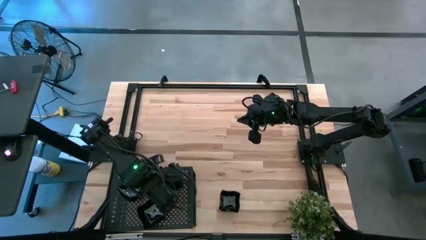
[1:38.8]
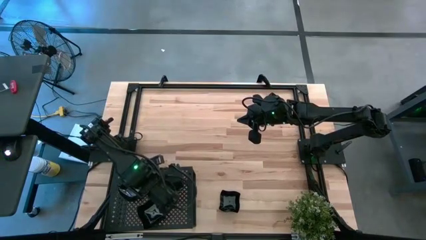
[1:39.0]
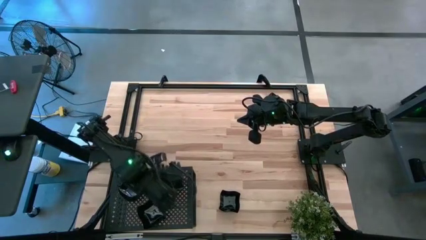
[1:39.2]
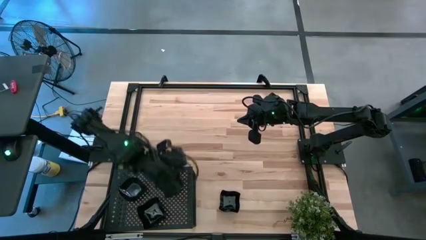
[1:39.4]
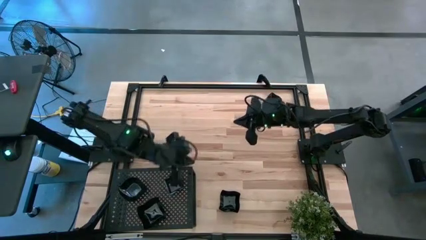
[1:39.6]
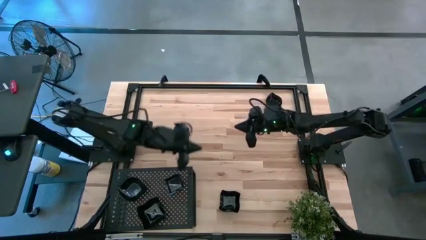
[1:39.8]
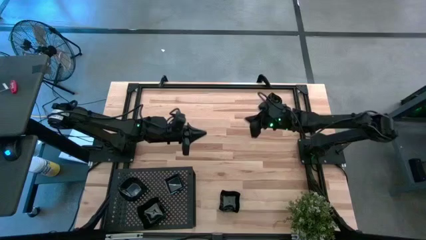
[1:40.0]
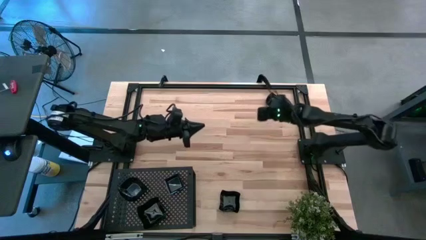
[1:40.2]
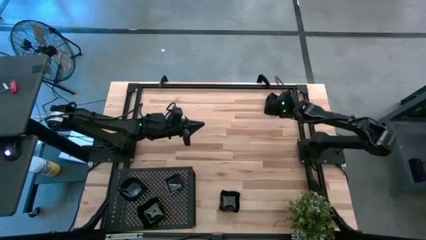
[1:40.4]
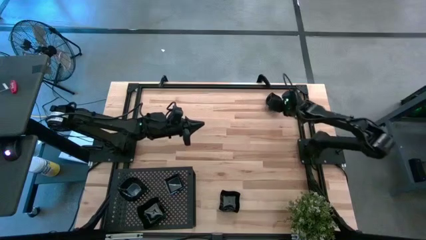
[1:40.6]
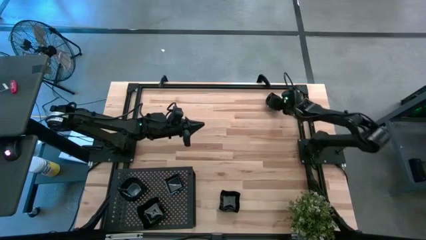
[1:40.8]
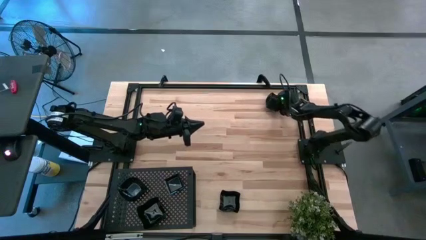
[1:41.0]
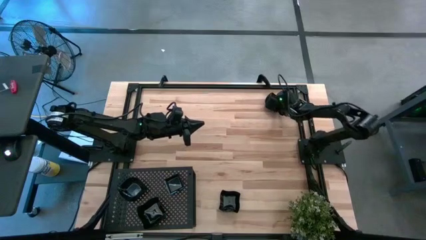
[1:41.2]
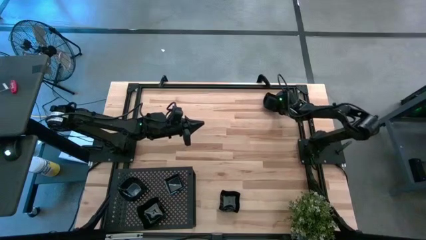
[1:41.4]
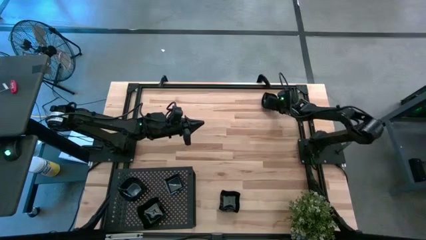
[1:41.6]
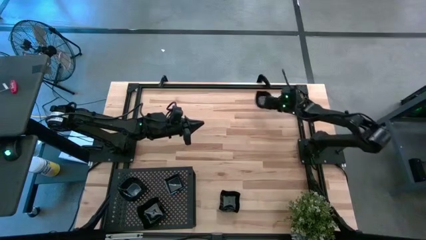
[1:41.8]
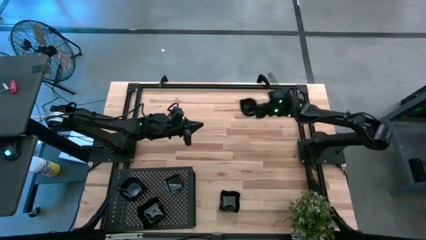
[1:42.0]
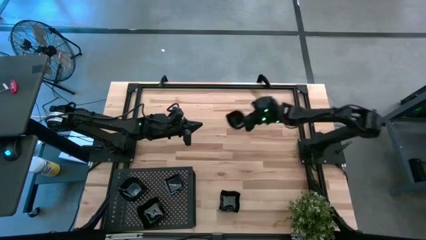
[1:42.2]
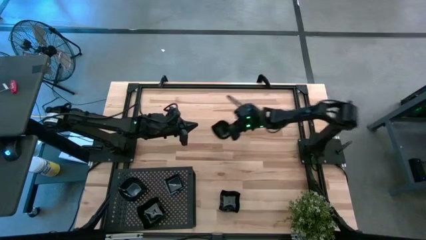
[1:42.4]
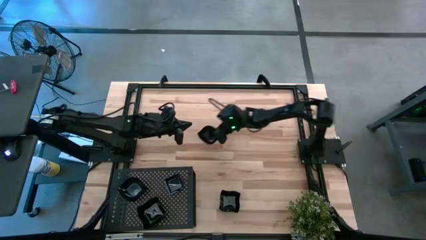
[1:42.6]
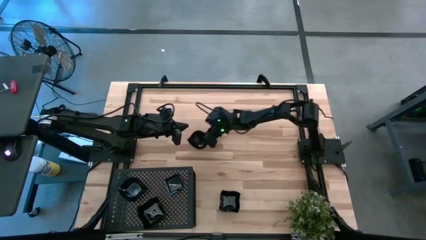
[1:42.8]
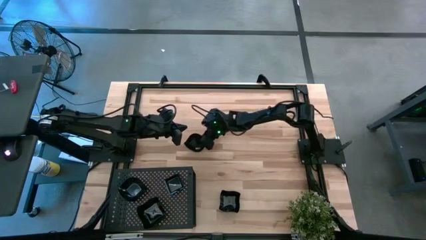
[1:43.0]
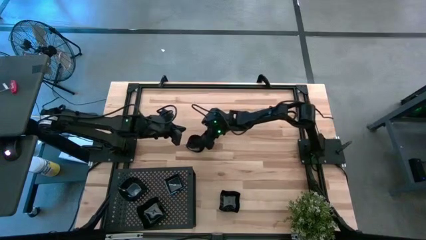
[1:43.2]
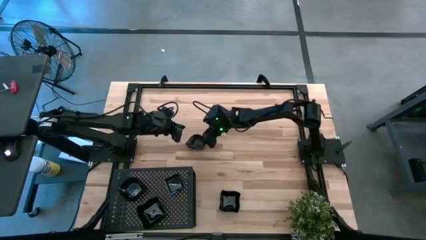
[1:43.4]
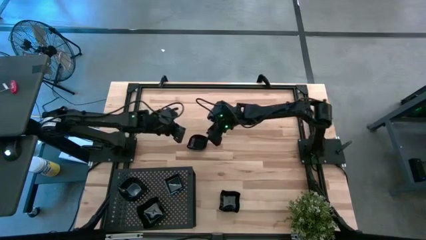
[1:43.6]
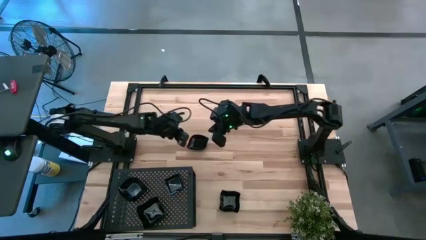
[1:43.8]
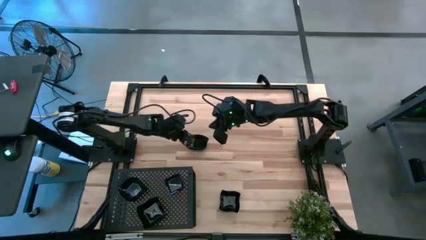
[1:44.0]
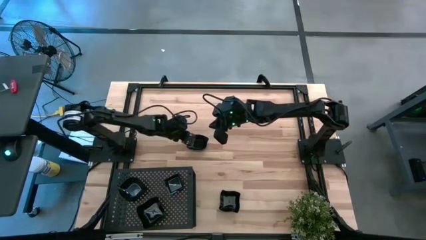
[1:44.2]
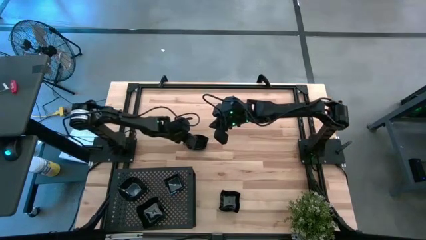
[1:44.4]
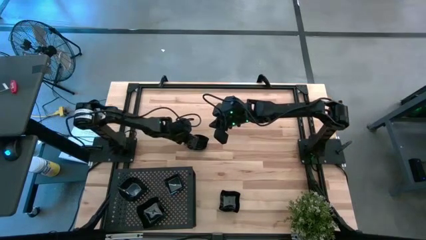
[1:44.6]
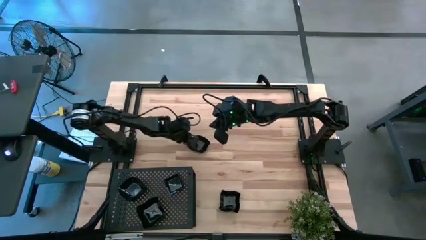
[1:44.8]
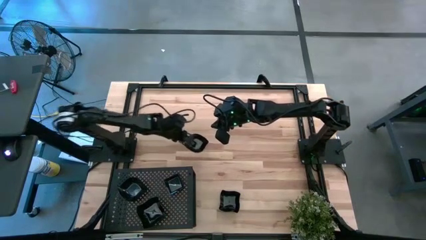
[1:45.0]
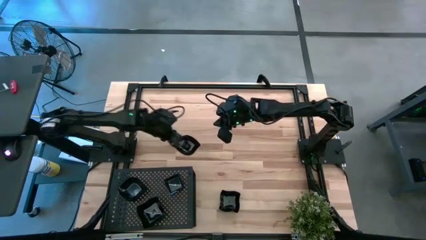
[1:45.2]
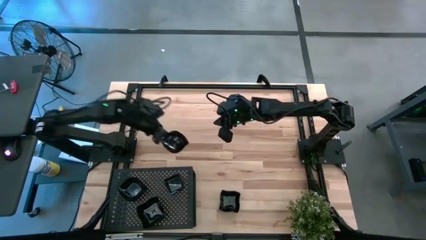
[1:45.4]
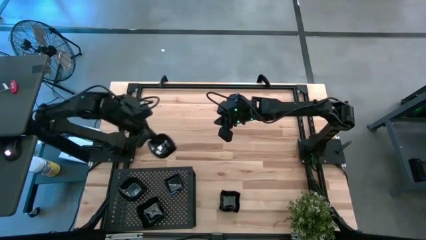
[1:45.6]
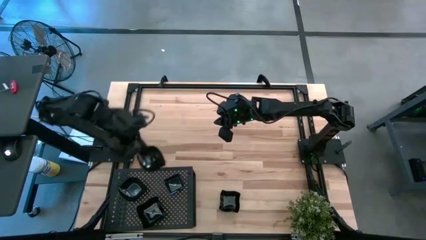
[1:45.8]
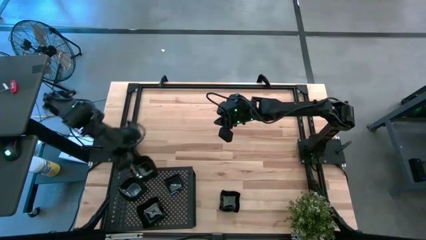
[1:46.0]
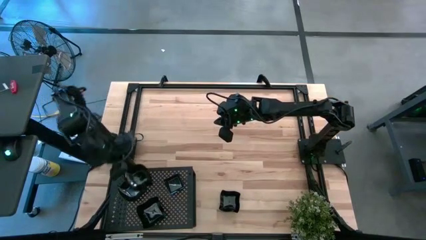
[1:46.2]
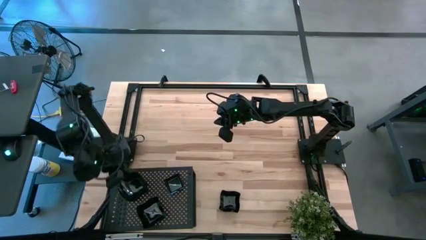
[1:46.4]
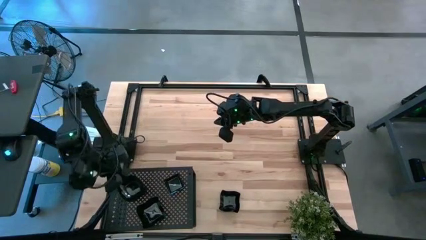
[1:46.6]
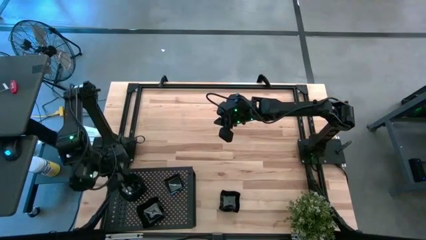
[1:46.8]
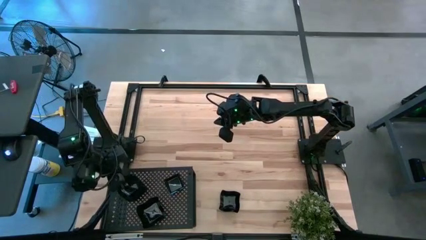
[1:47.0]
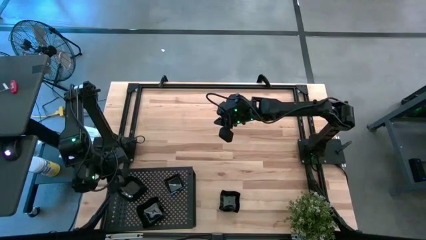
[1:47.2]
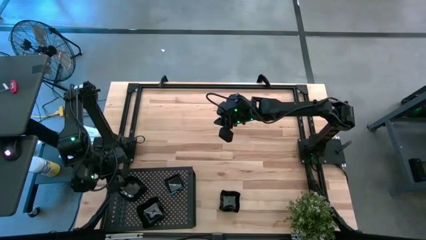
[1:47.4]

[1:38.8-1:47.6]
Task: Pick & Place Mini shaped plates
Stack the leaf-shaped plate on top of the leaf-shaped plate on the shelf

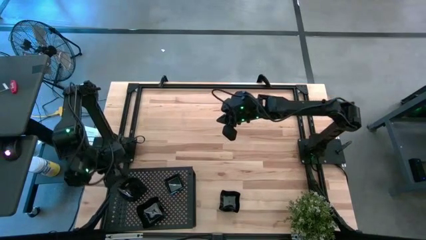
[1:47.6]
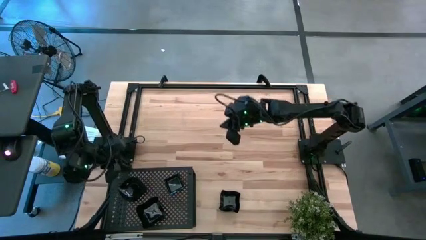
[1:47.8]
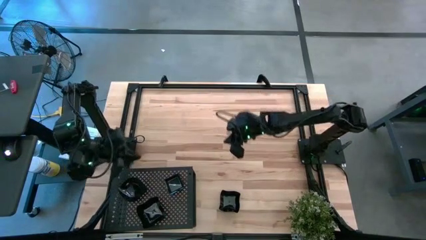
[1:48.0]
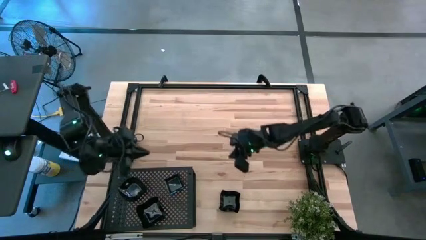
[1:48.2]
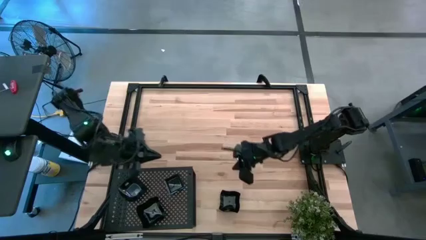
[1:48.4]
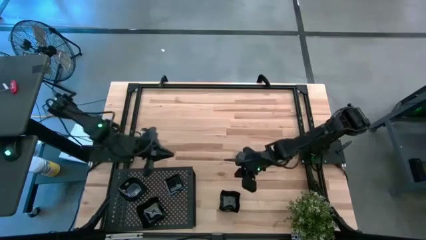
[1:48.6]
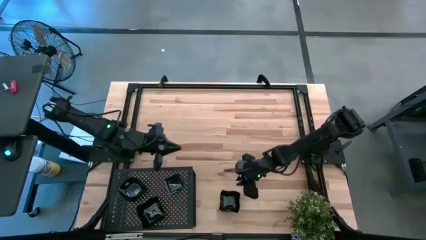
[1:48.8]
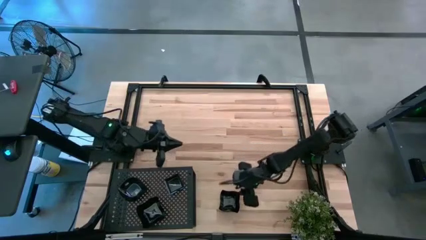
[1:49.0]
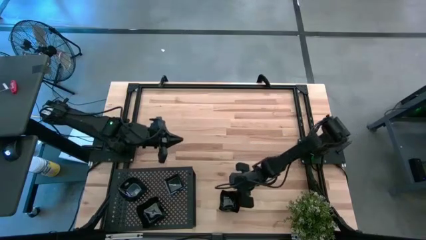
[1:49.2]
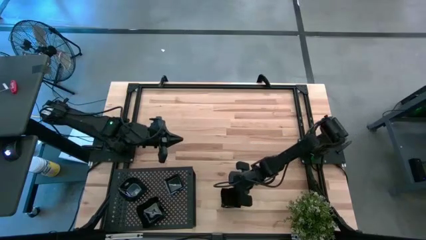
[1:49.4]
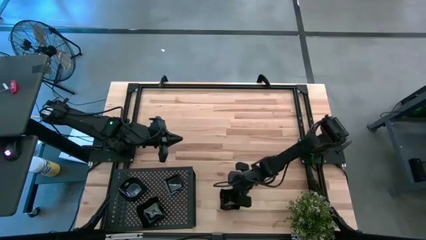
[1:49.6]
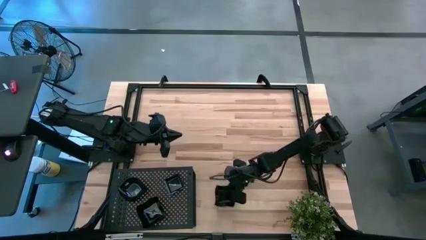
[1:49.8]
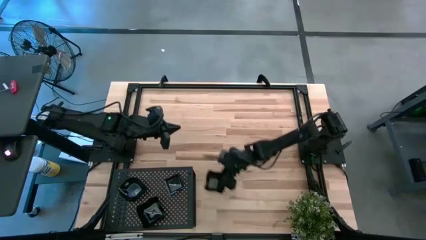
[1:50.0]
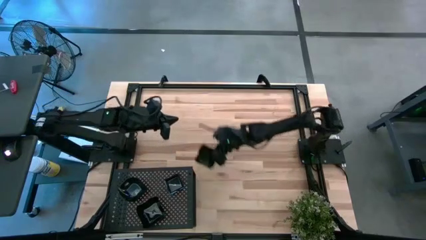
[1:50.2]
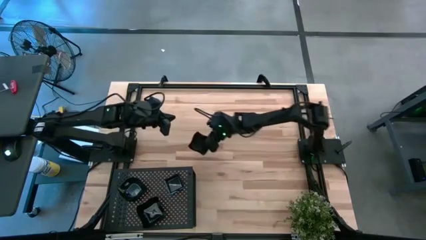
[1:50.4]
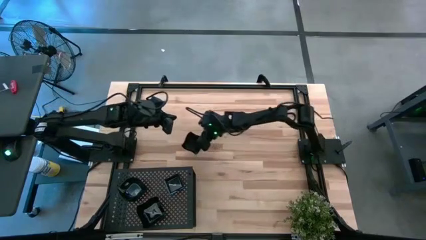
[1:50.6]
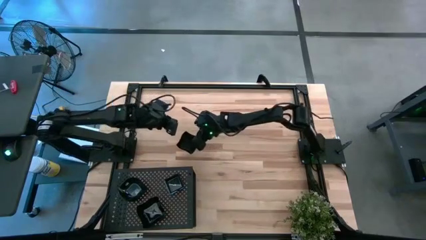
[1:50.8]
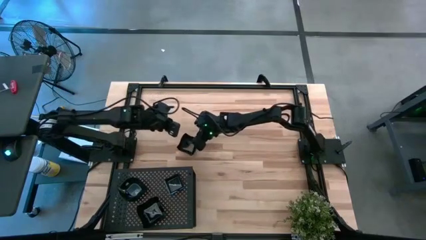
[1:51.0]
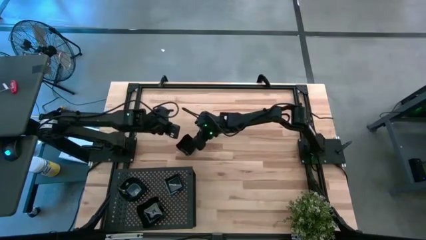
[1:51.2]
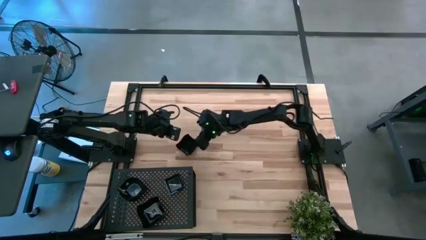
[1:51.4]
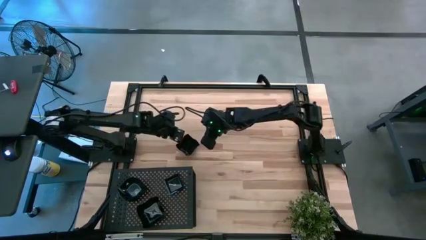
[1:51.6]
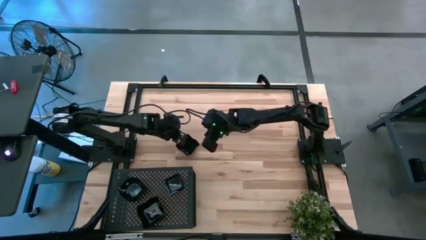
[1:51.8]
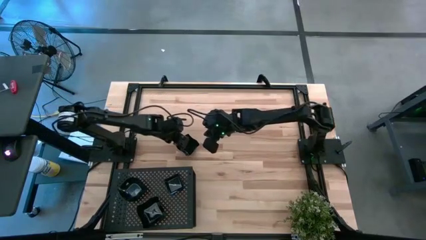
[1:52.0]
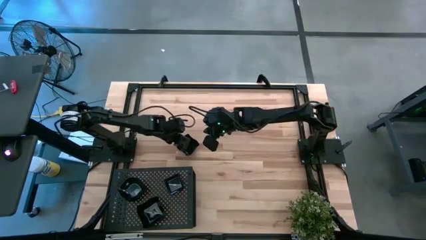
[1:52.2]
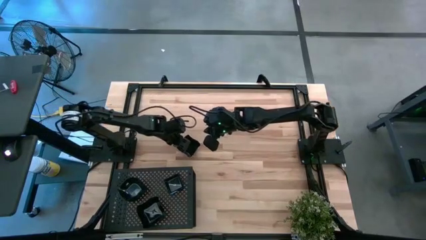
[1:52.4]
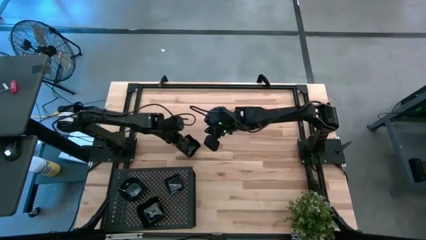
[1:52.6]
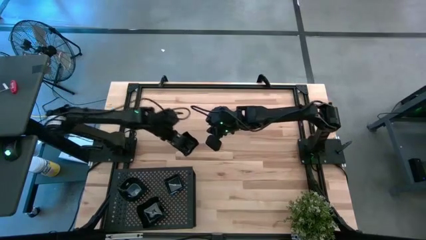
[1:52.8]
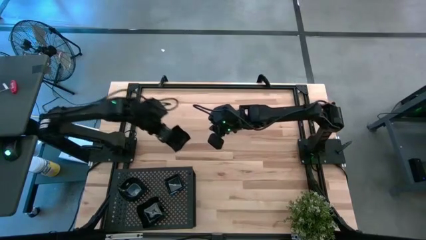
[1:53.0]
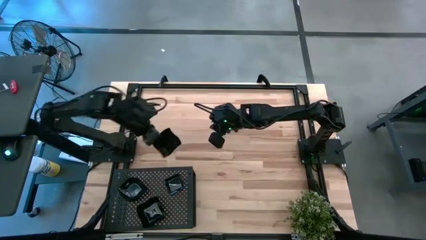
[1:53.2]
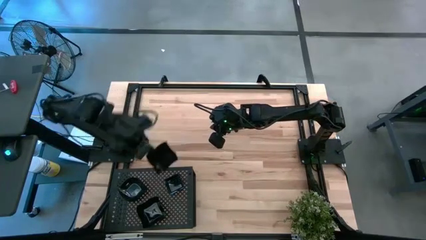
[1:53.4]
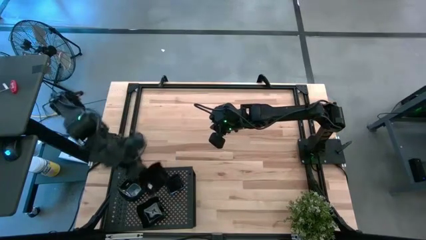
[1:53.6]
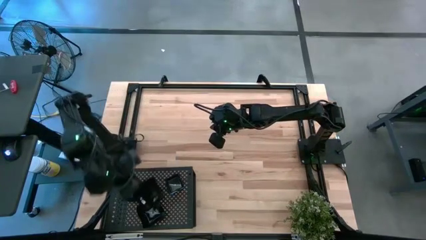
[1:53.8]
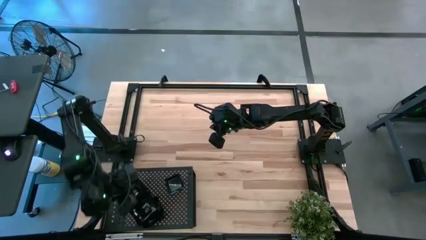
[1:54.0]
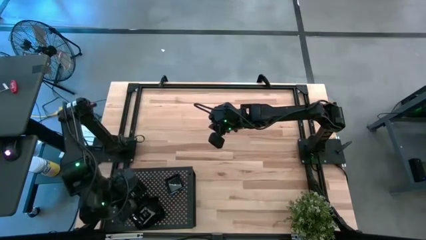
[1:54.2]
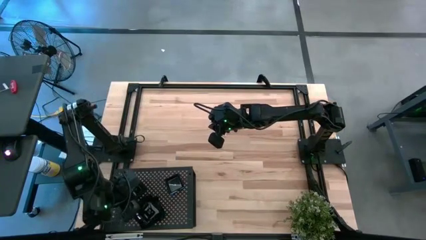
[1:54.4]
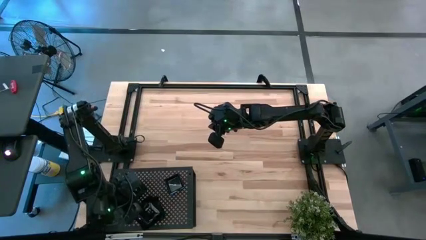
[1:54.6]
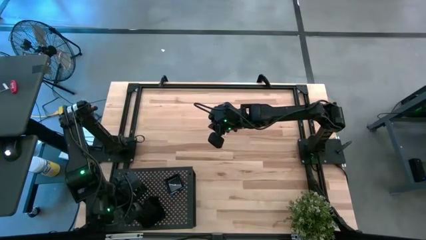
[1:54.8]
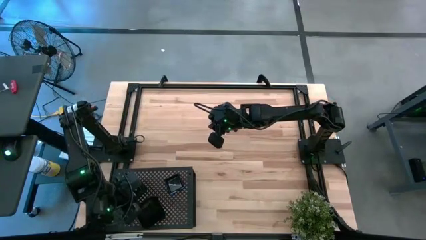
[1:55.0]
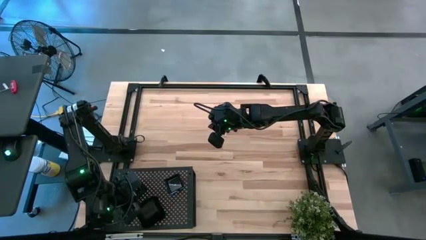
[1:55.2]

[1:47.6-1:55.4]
Stack the distorted square plate on top of the distorted square plate on the shelf
